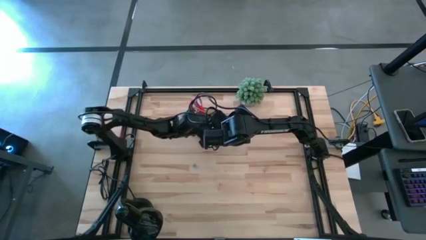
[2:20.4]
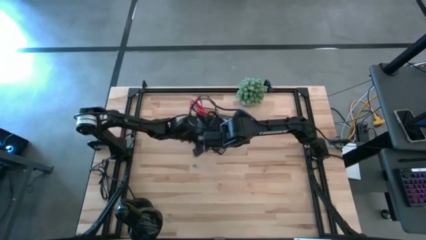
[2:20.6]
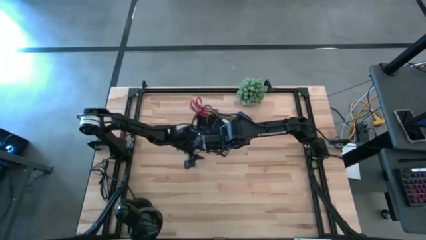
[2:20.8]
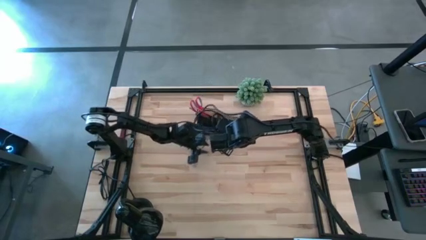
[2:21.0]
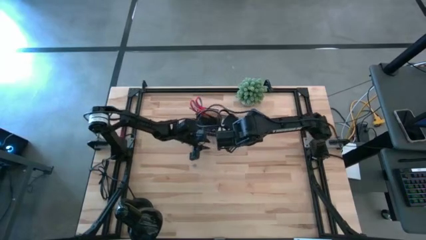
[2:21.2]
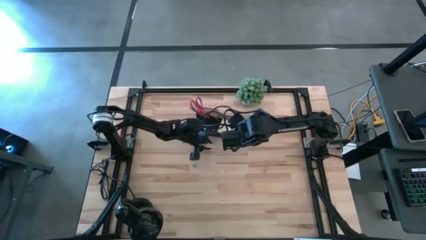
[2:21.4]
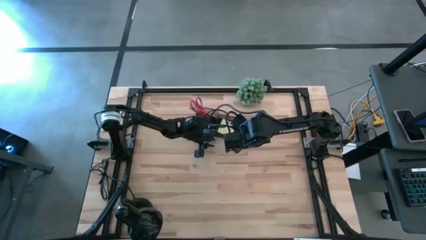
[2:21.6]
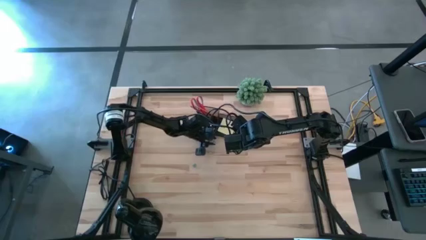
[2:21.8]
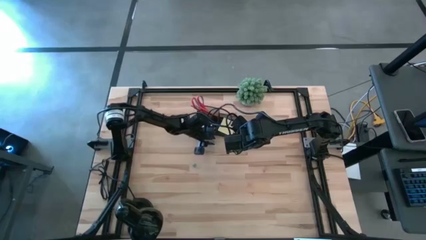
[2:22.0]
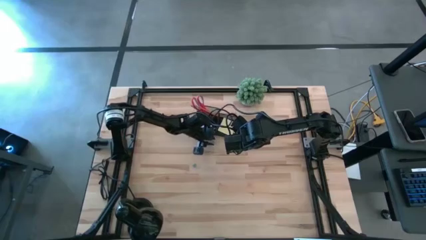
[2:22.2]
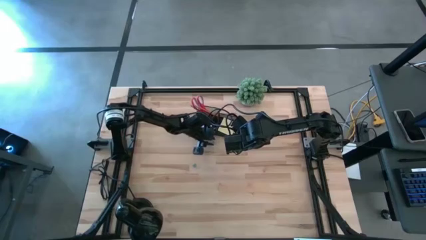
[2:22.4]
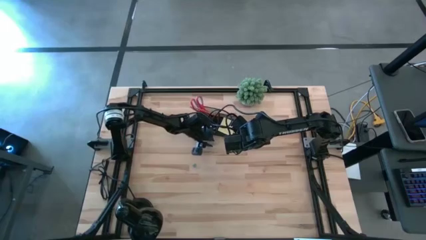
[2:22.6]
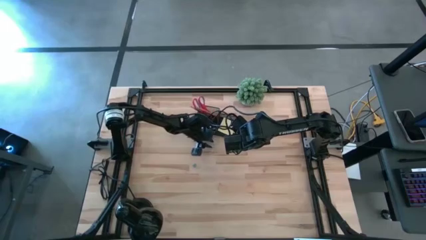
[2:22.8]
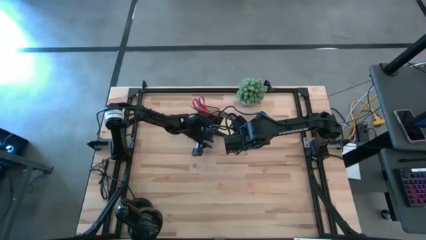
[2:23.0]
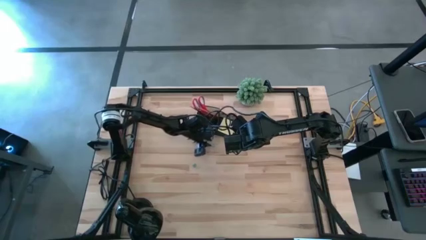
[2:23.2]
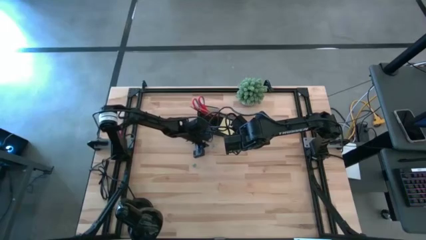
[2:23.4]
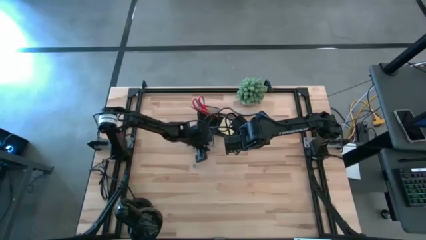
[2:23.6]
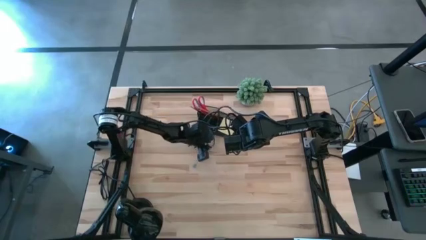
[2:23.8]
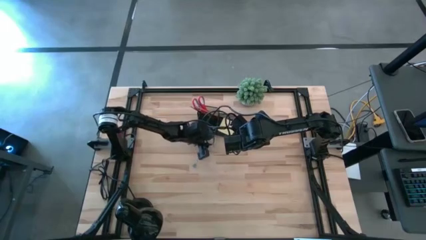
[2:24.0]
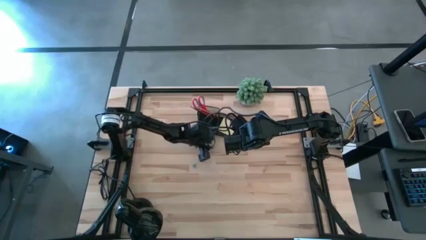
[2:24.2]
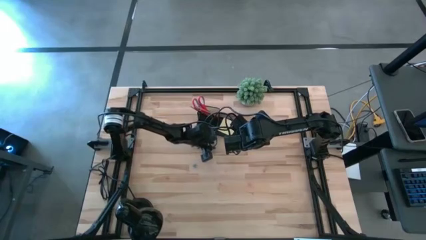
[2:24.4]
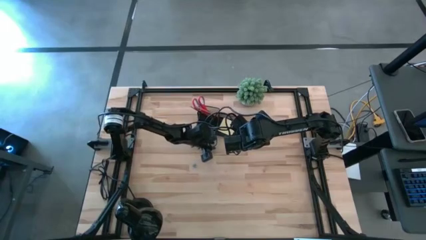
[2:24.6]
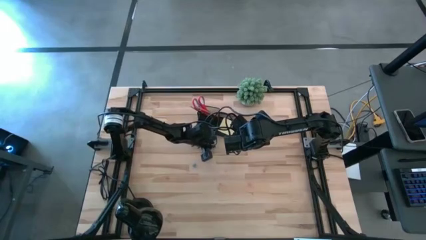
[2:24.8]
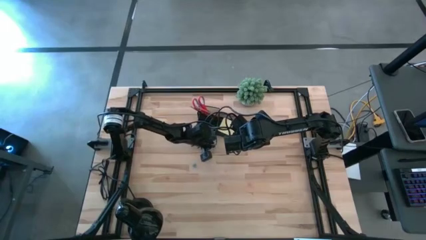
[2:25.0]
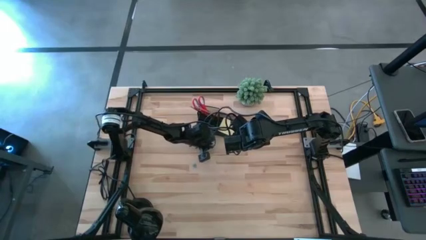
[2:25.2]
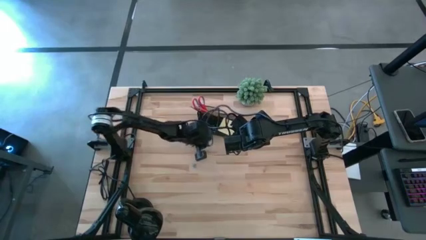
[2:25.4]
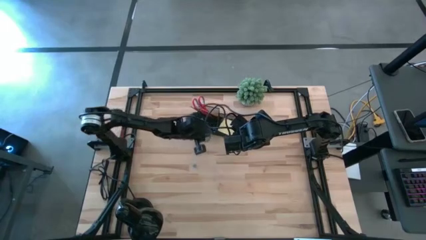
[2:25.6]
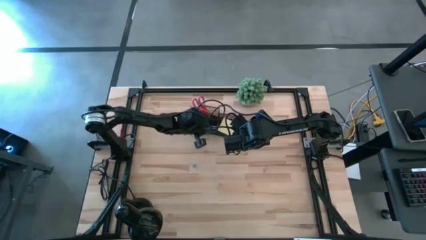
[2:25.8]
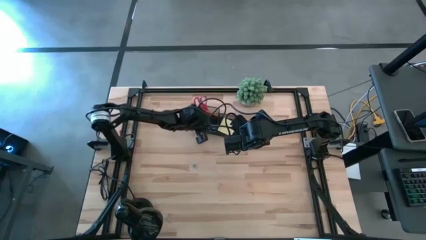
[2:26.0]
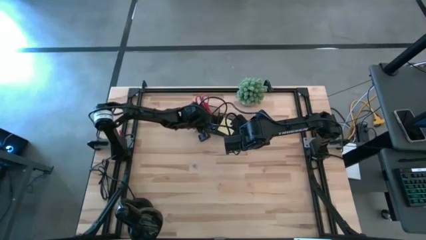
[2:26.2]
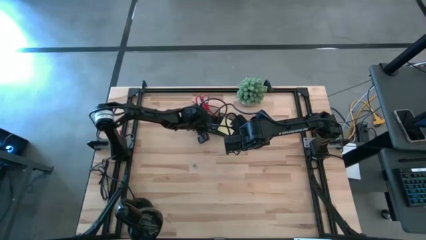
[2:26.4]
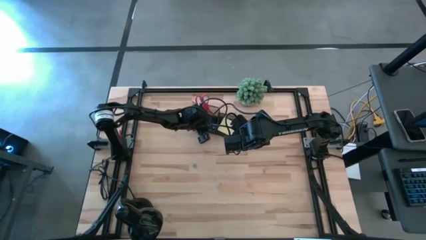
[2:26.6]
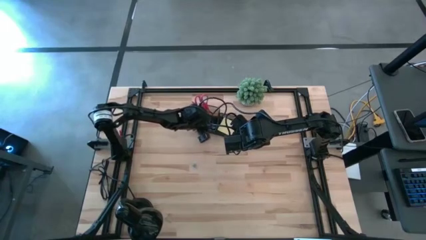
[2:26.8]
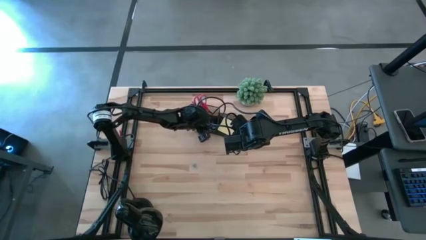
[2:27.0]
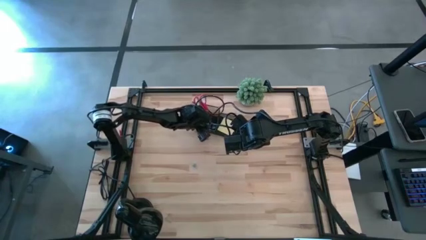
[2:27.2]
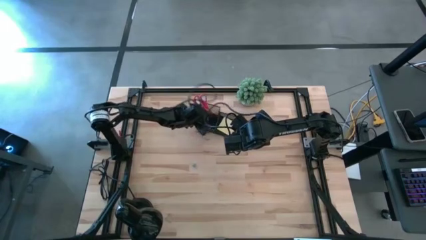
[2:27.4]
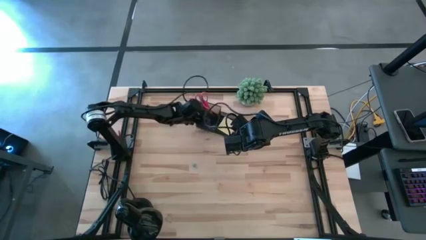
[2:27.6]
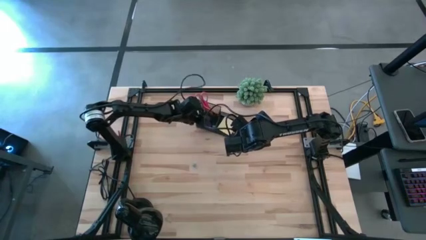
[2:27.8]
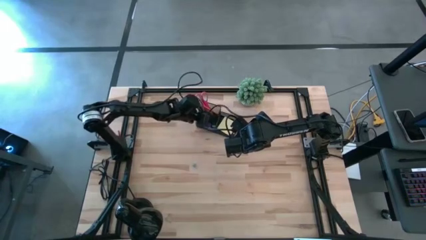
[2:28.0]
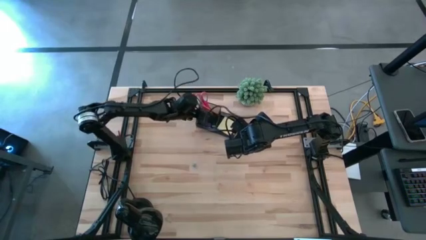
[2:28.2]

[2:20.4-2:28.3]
Task: Pick and place office supplies into organizer
Put the bottom blue binder clip into the desk organizer

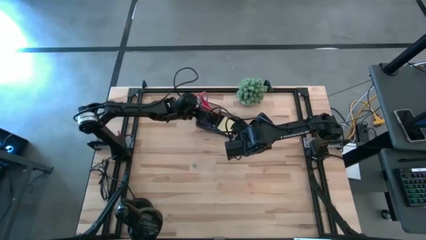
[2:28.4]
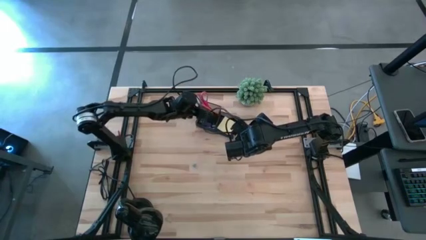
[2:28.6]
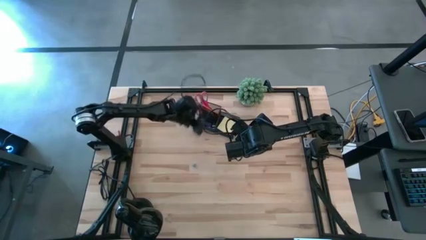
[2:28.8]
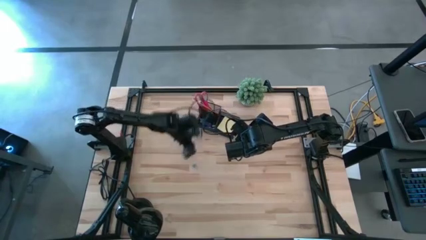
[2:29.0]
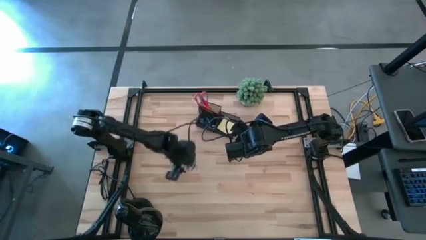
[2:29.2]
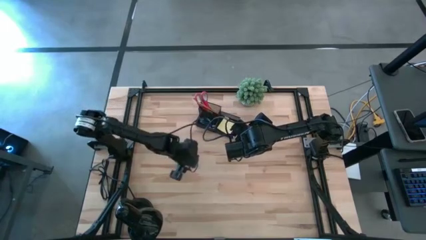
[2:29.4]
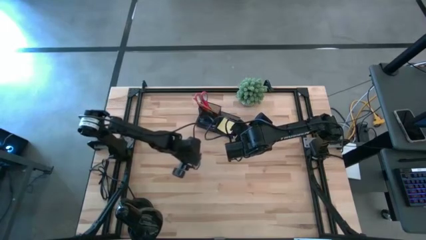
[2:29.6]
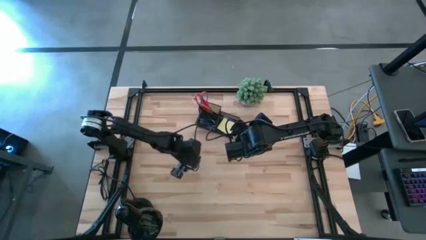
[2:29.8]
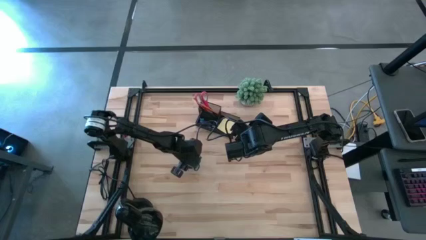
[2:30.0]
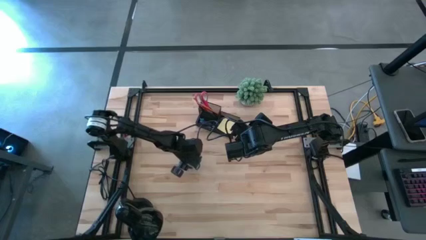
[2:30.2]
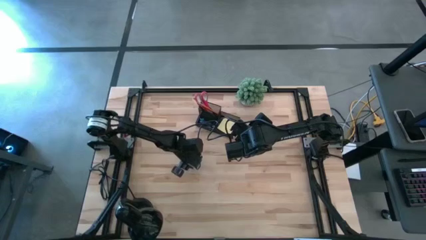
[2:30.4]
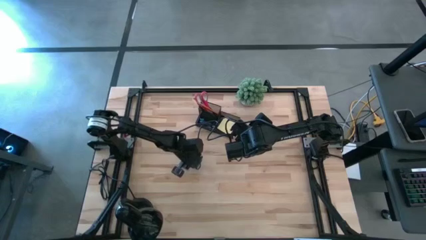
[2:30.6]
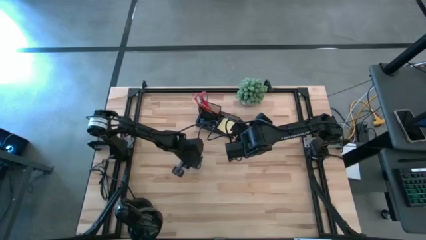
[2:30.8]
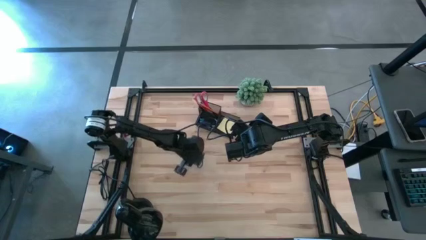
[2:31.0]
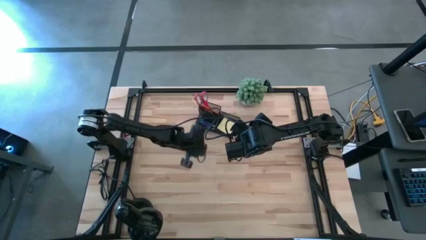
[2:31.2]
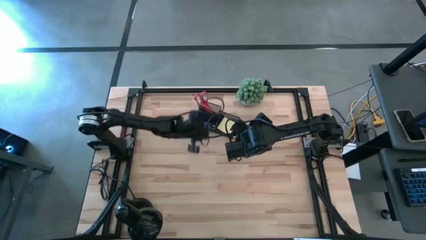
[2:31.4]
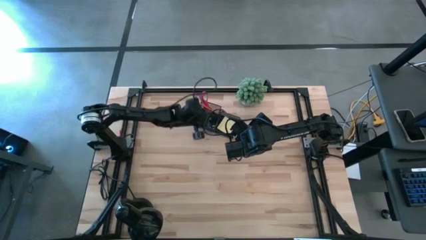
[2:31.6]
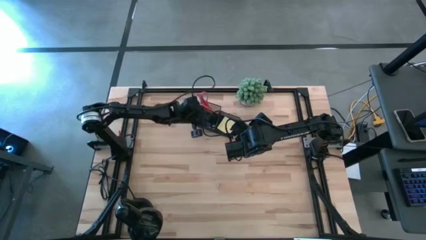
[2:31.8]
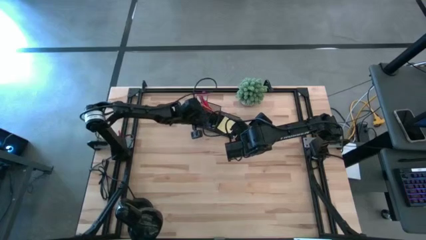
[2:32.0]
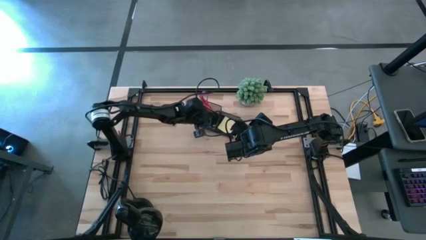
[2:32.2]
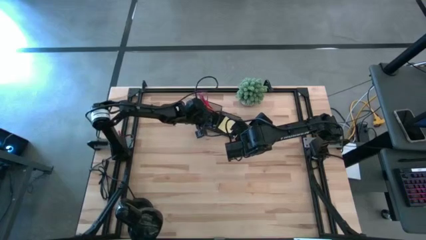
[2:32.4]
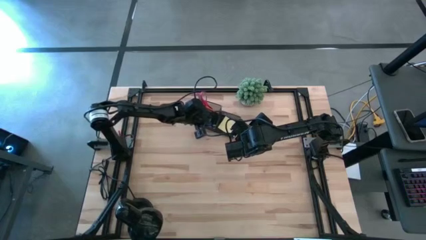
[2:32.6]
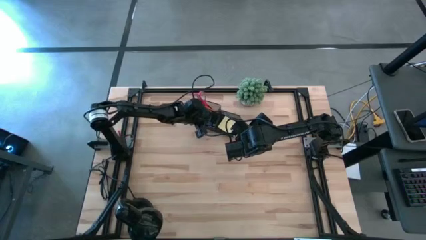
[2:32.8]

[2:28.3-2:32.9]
Put the blue binder clip into the desk organizer

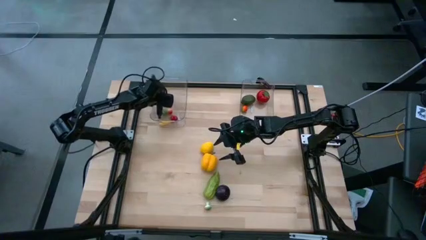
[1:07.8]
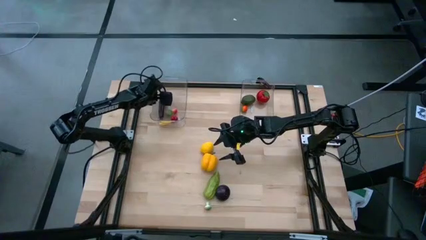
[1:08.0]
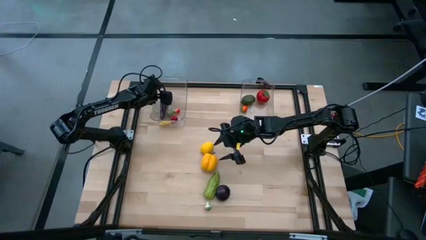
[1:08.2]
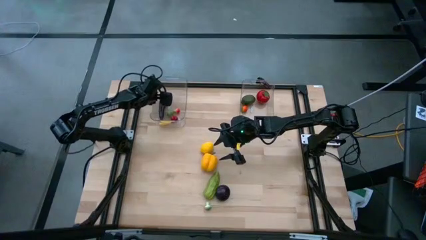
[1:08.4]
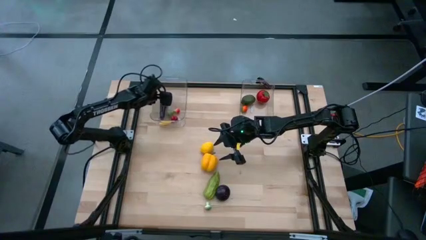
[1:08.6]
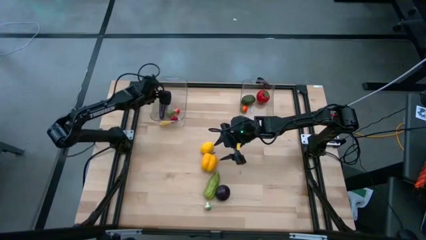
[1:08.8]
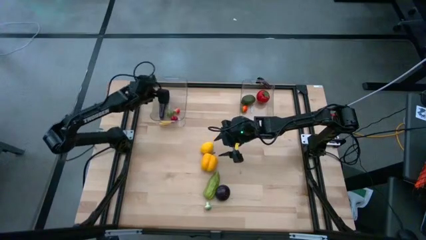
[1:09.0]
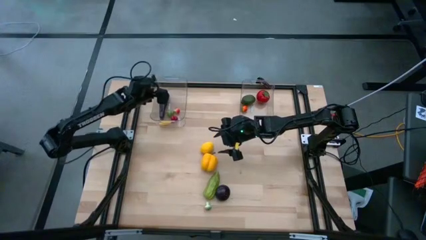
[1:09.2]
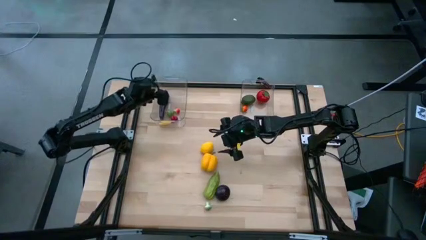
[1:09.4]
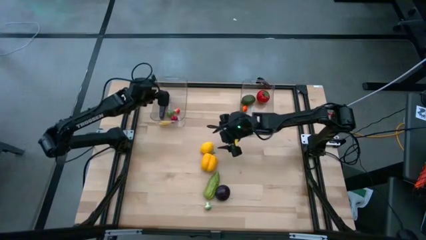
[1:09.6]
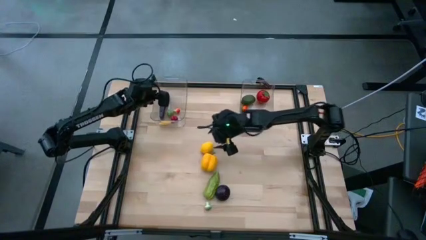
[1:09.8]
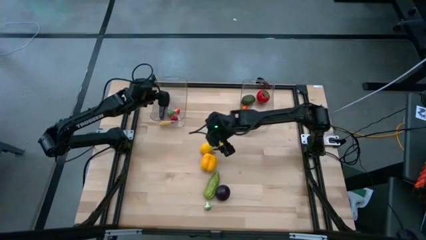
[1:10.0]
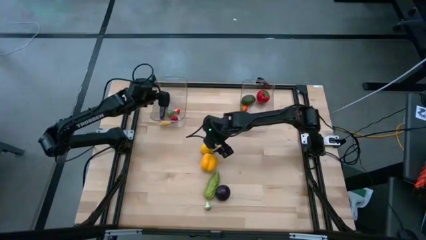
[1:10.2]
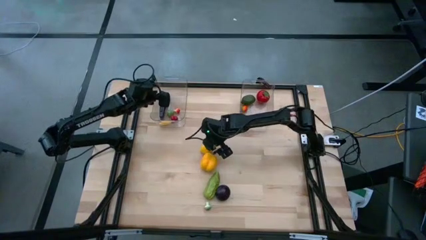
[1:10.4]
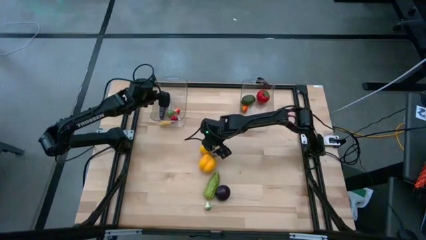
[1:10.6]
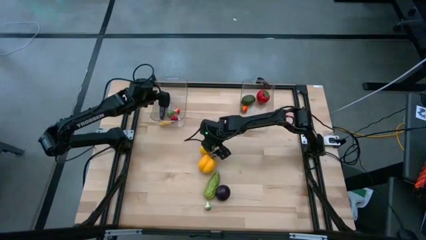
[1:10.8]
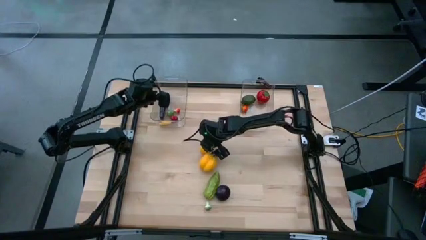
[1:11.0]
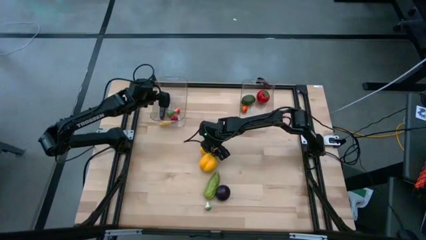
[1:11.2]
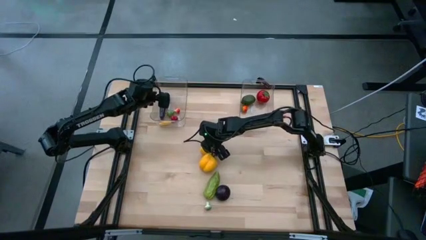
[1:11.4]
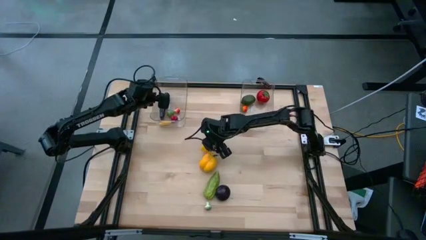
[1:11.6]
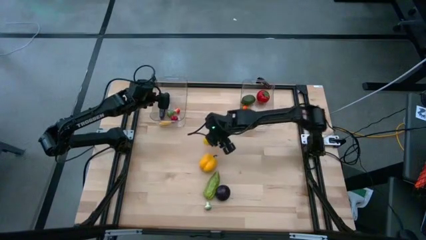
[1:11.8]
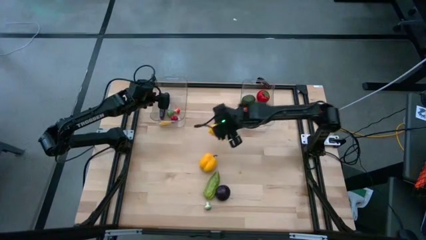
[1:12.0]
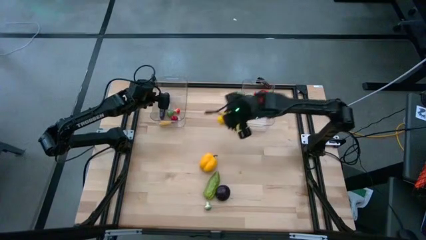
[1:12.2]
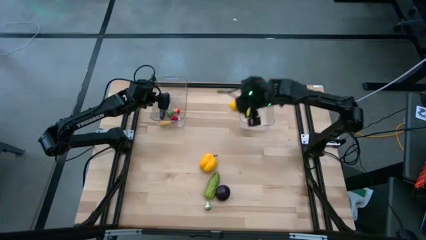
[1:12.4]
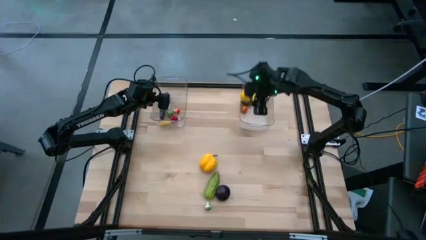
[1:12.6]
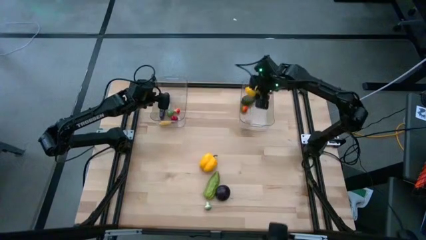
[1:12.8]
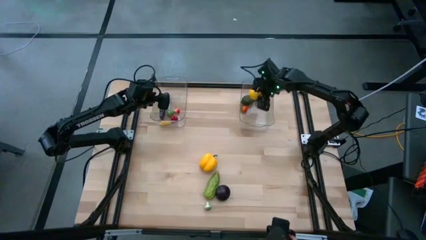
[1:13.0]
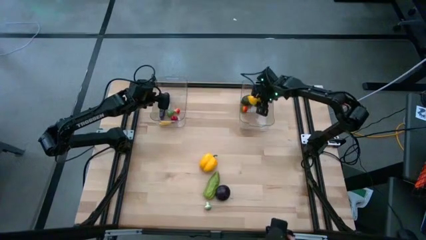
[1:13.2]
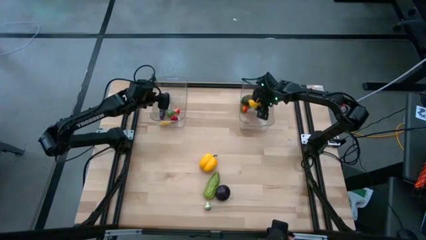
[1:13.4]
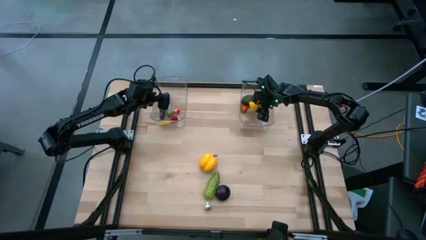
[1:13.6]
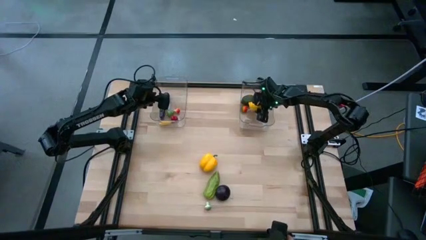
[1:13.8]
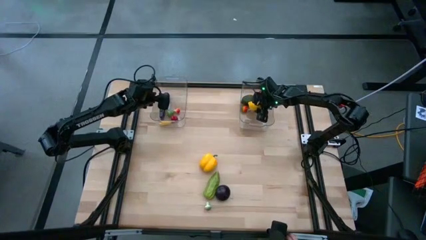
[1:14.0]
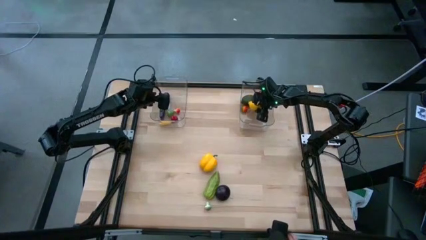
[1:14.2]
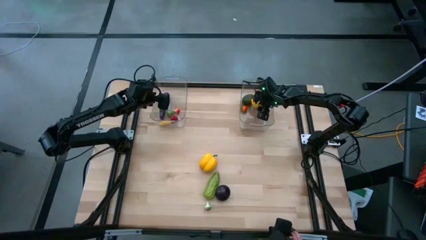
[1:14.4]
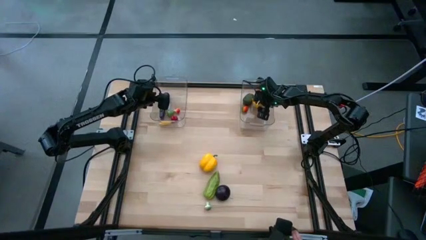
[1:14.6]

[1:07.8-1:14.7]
Task: Sort produce into baskets
Put the yellow lemon into the right transparent bin
